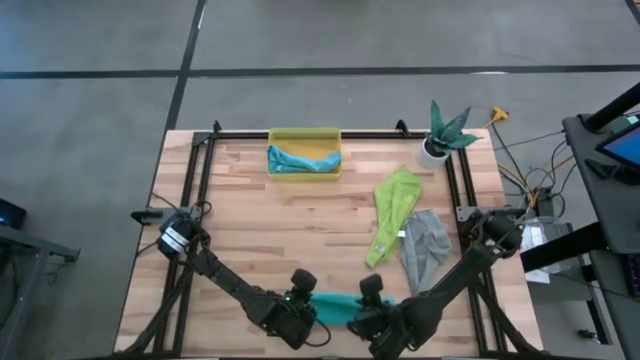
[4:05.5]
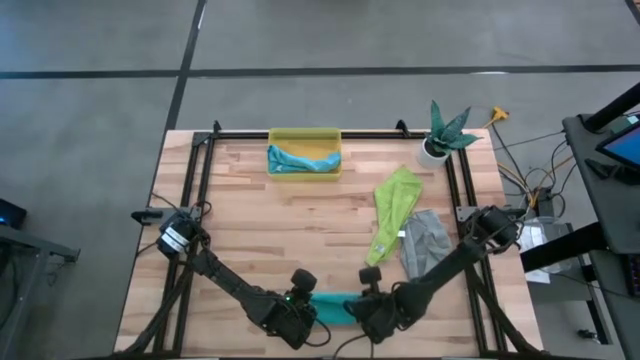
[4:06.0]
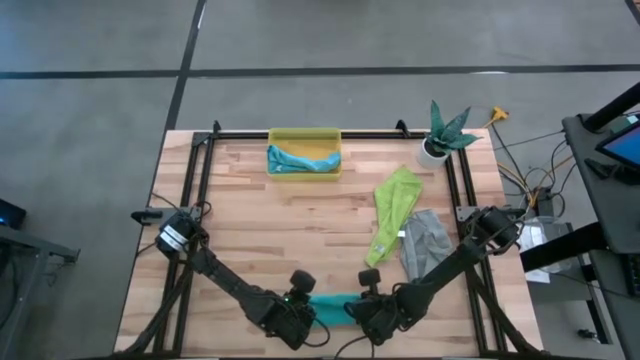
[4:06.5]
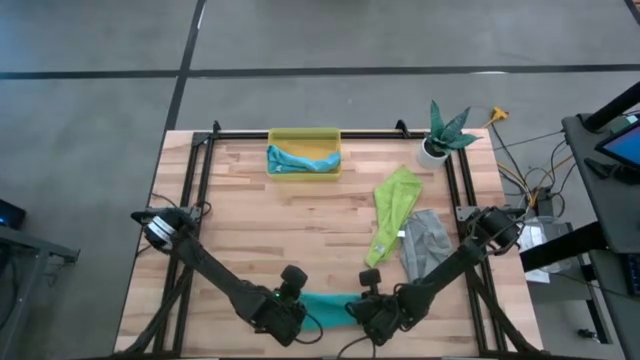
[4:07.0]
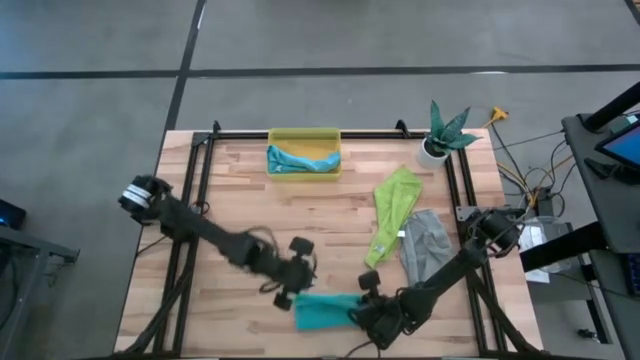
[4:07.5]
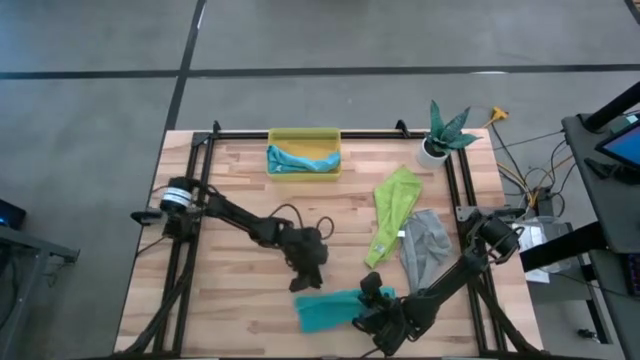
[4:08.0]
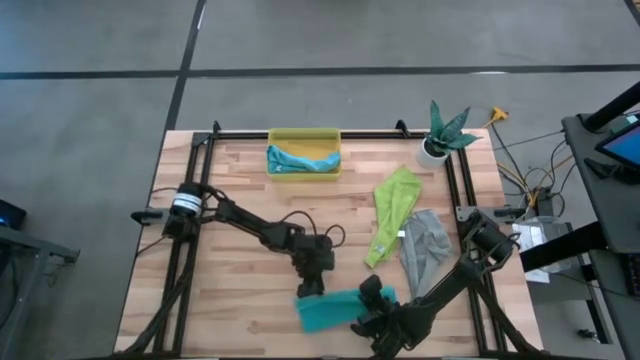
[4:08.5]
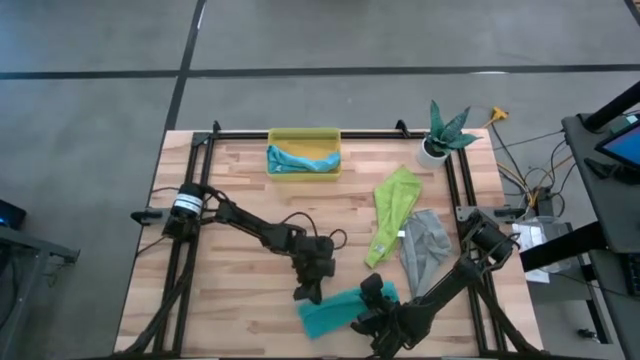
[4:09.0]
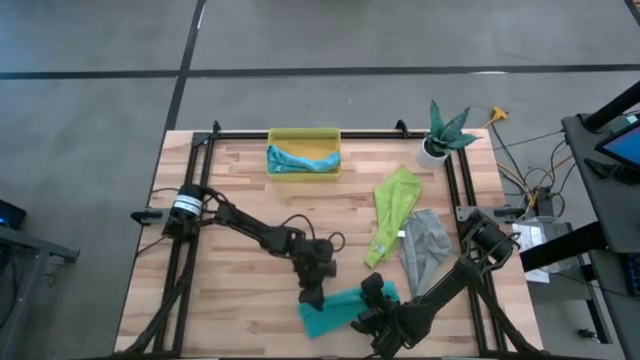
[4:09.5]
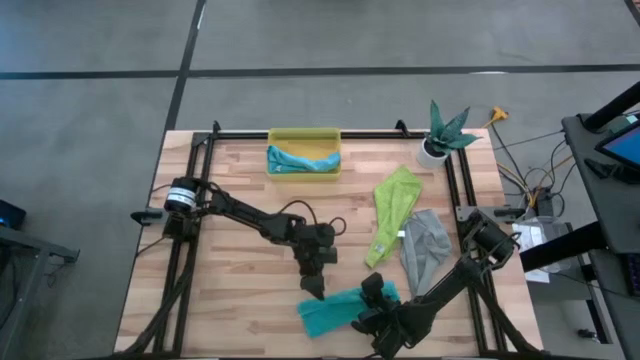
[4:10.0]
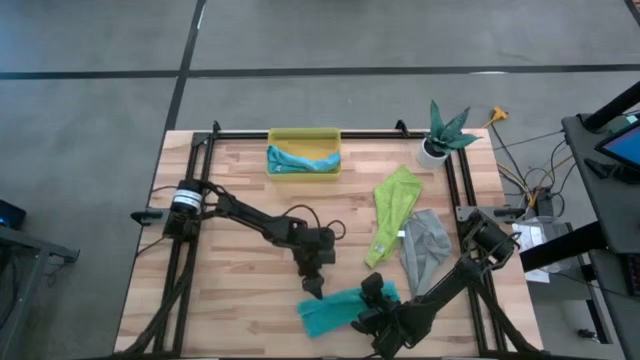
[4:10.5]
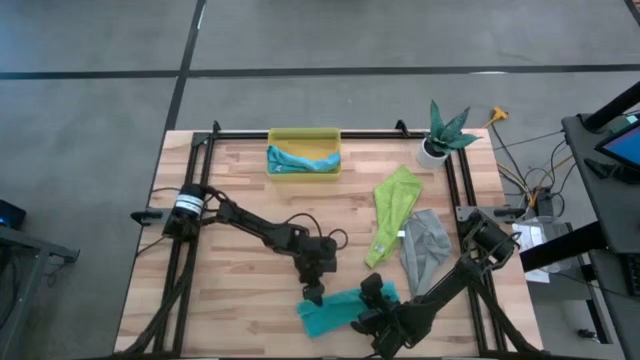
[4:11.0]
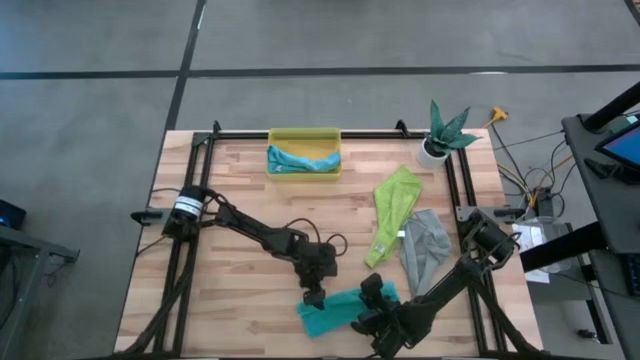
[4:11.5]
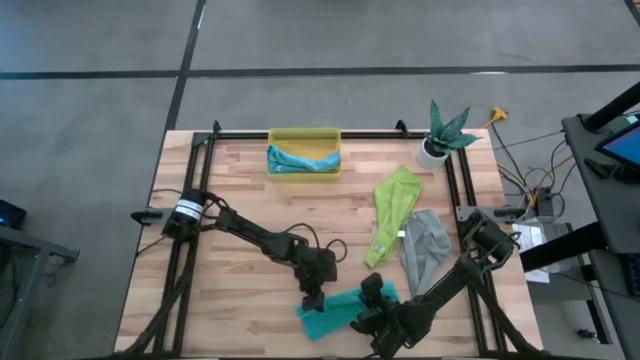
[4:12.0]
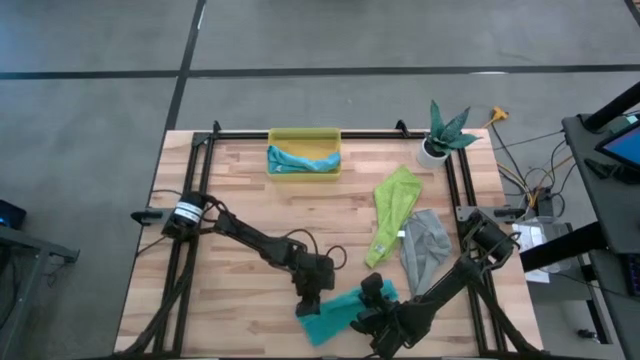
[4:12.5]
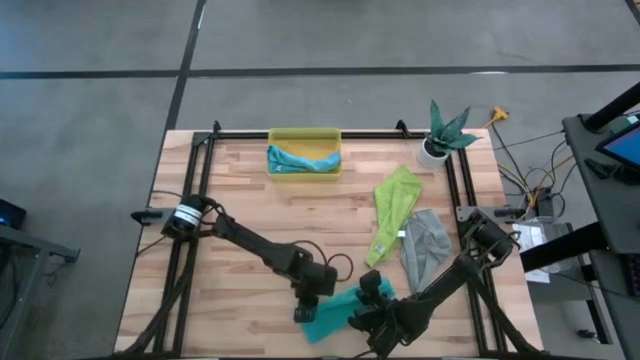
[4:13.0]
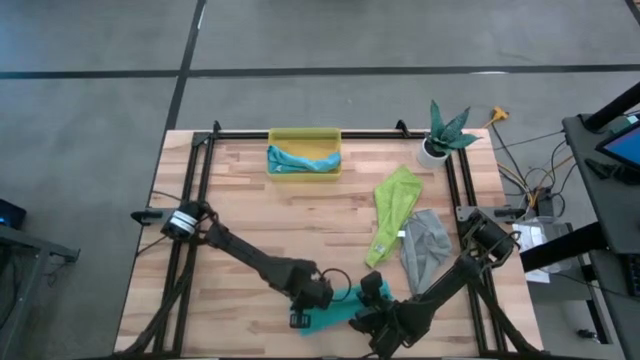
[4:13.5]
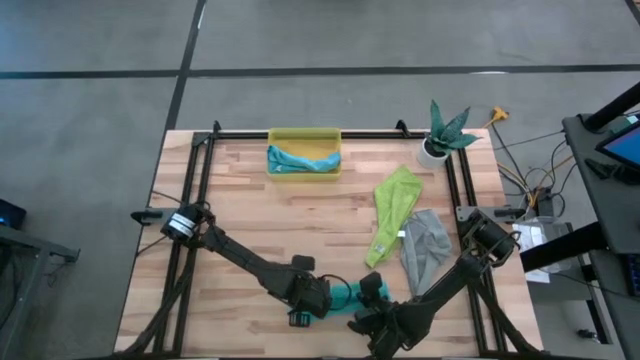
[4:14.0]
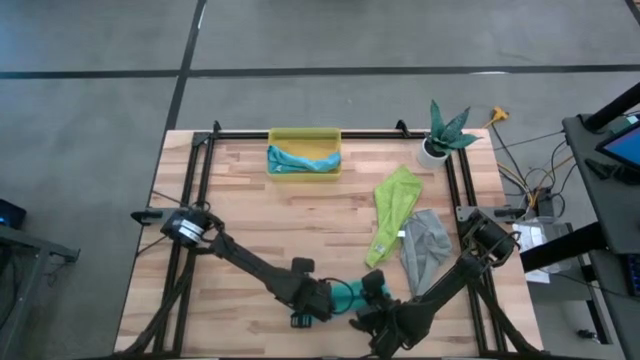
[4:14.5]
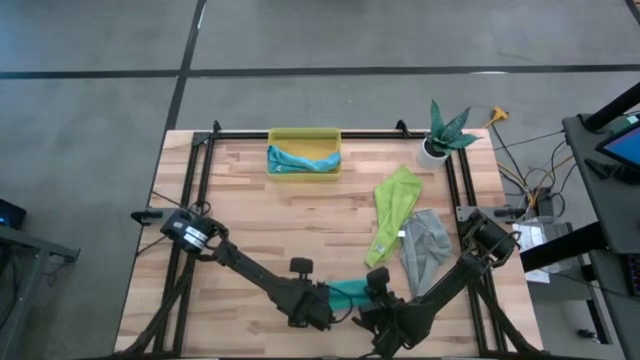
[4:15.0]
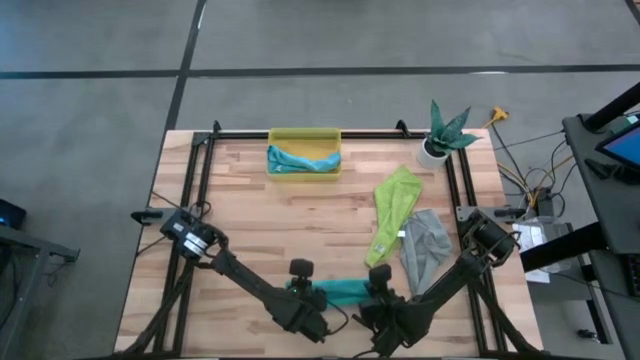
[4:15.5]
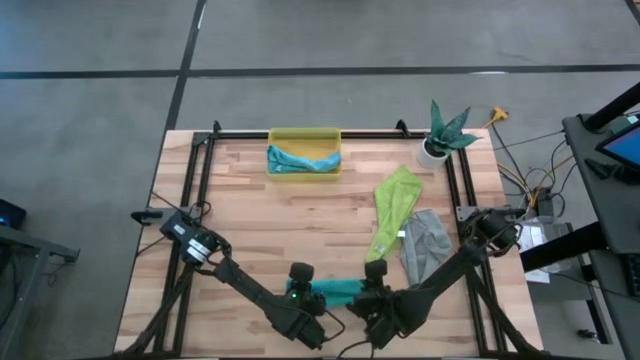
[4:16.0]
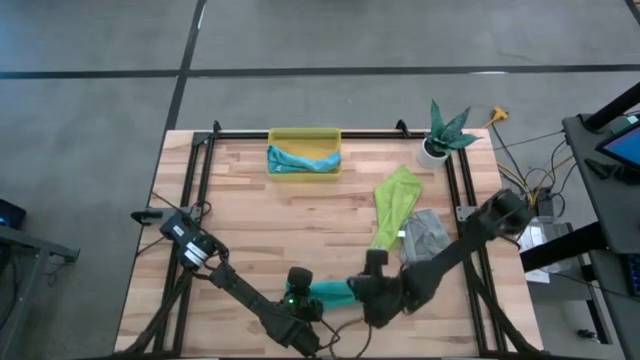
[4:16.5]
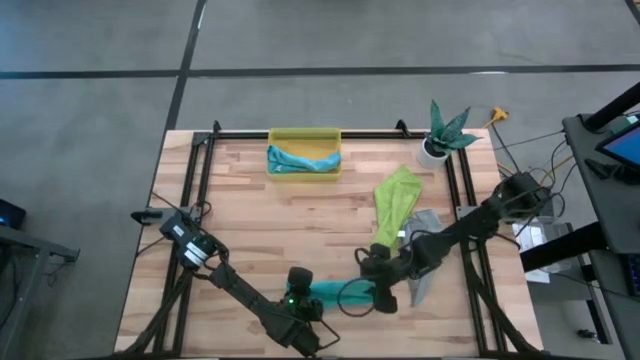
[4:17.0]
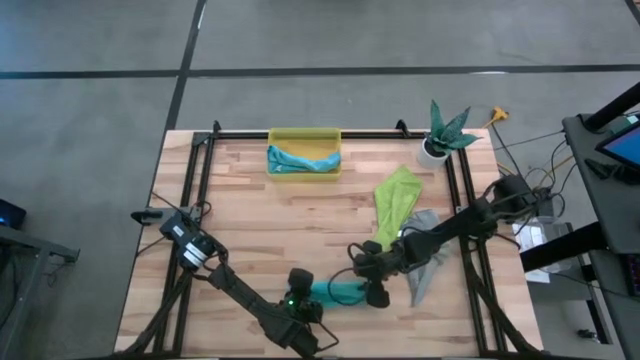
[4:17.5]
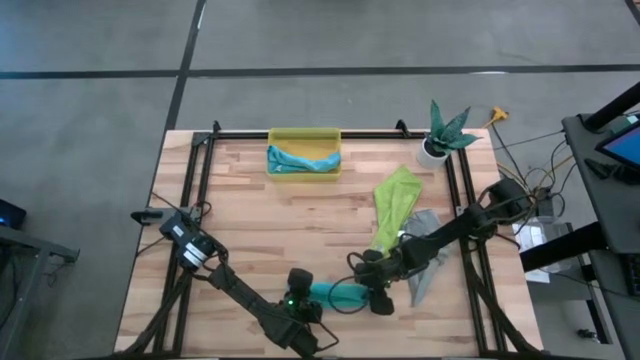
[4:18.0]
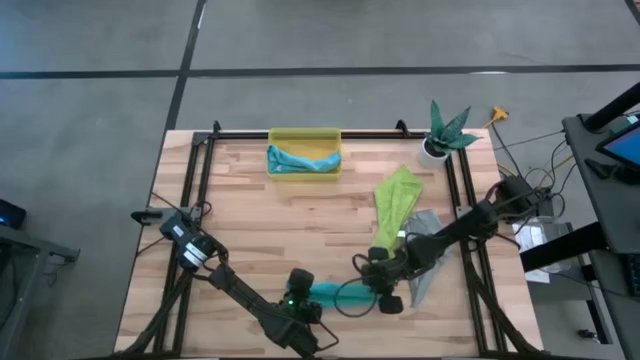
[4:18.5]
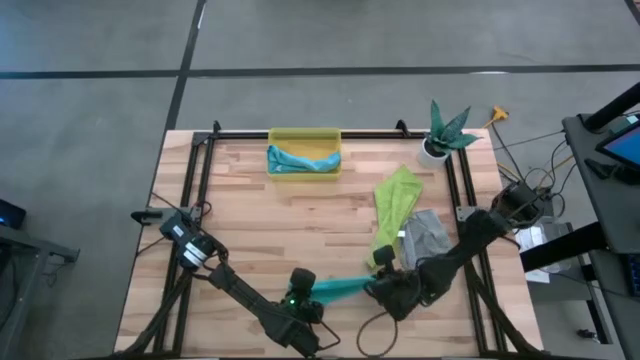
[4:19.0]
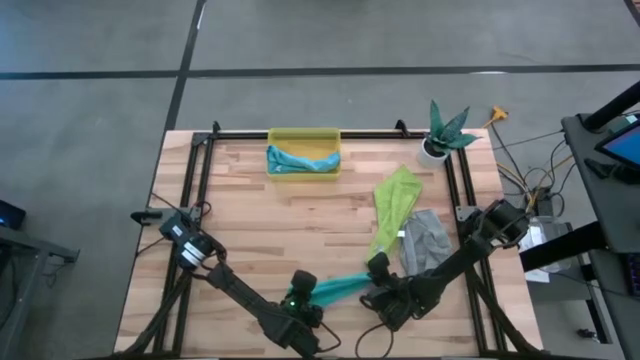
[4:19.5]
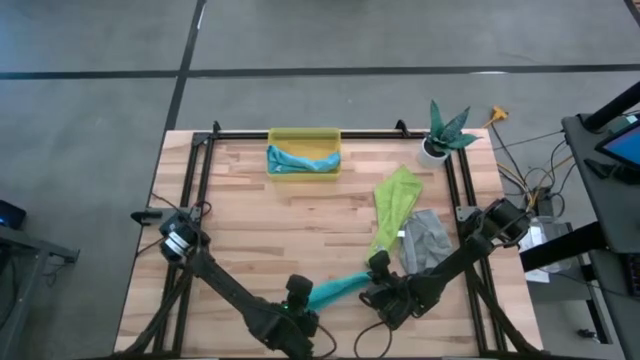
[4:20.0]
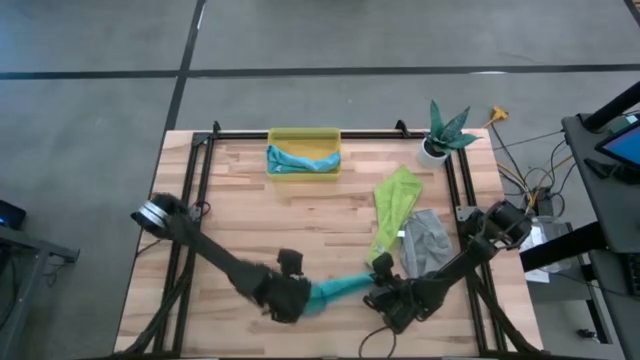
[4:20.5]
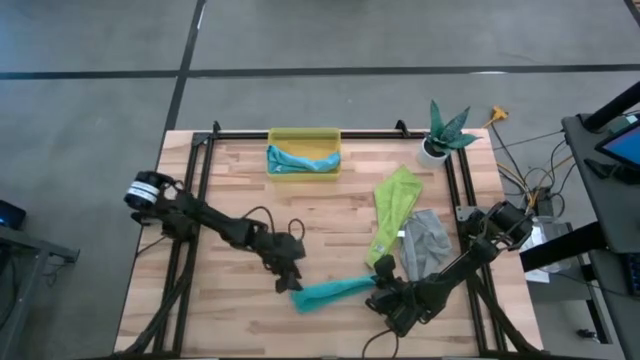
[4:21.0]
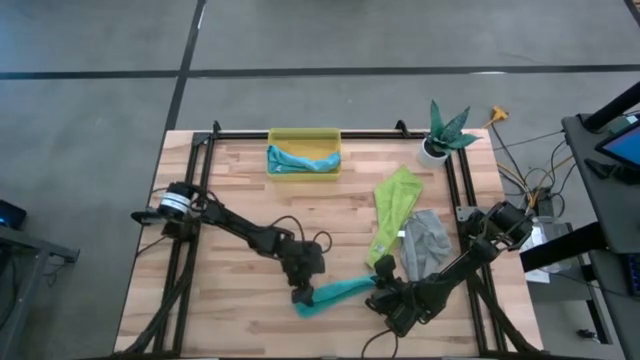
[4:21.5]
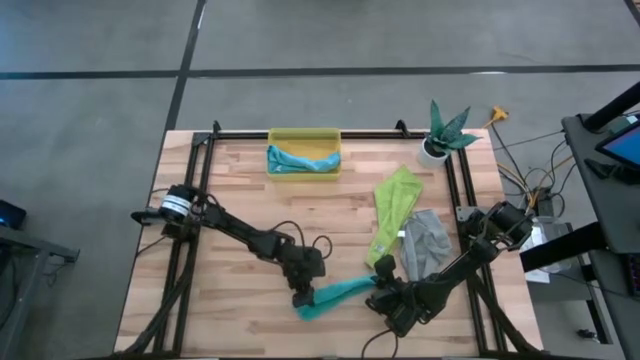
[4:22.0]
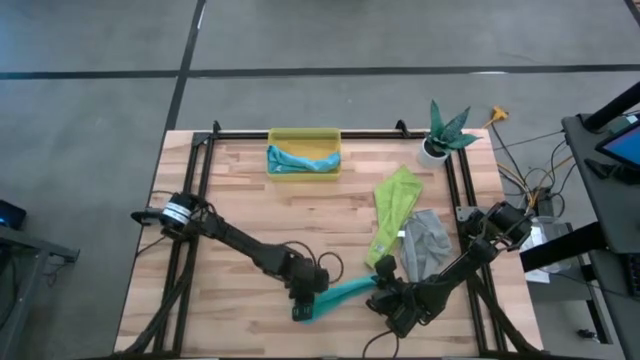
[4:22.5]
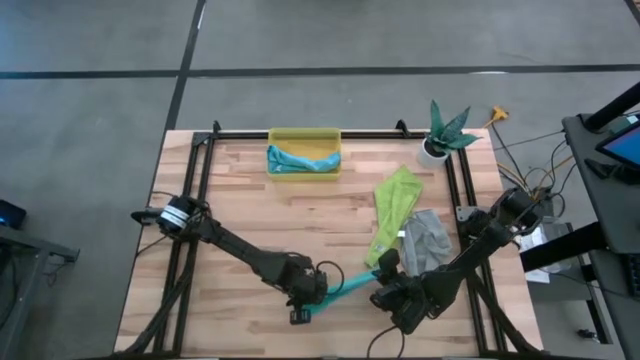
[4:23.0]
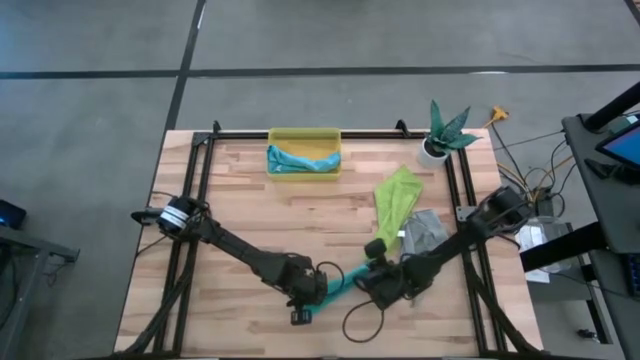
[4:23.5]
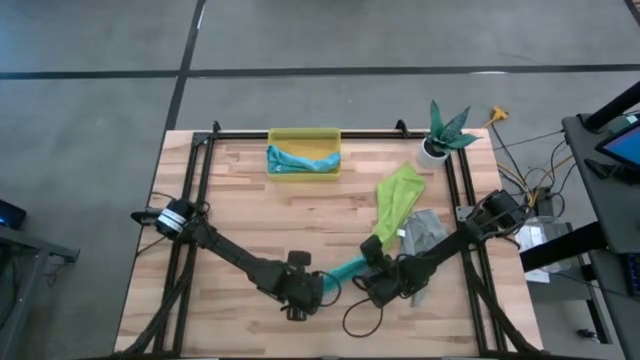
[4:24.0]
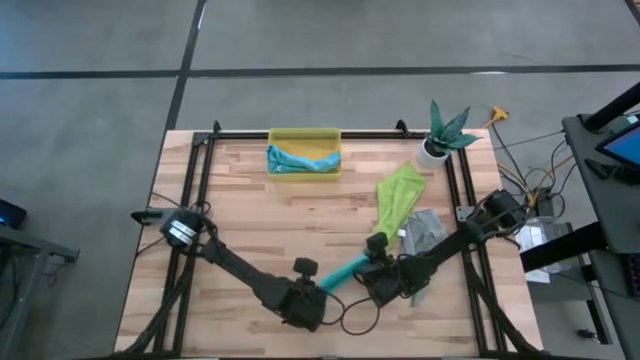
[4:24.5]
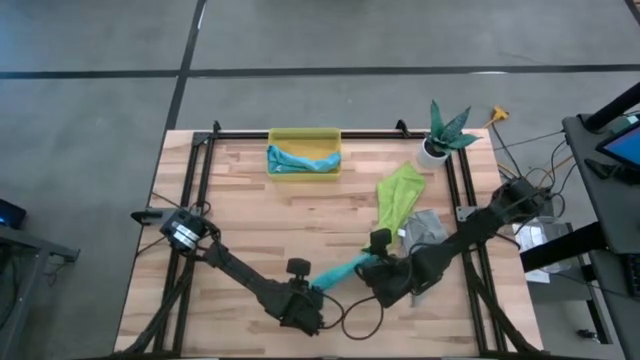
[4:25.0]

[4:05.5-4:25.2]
Task: Roll microfiber towels into tight, uniform cylinder then place into a basket
Roll the light blue towel
